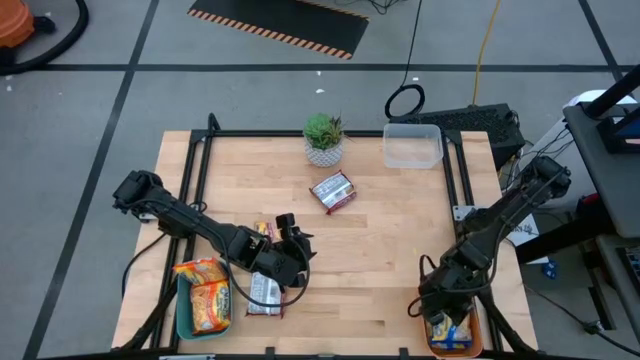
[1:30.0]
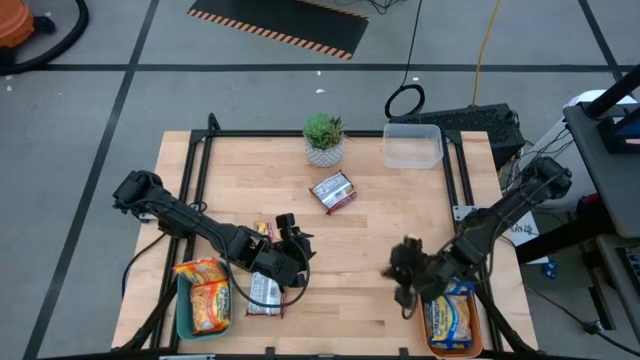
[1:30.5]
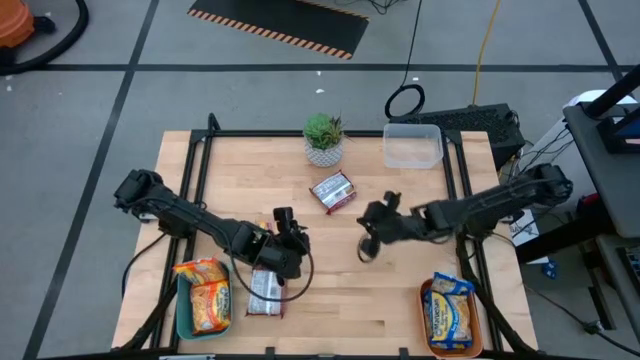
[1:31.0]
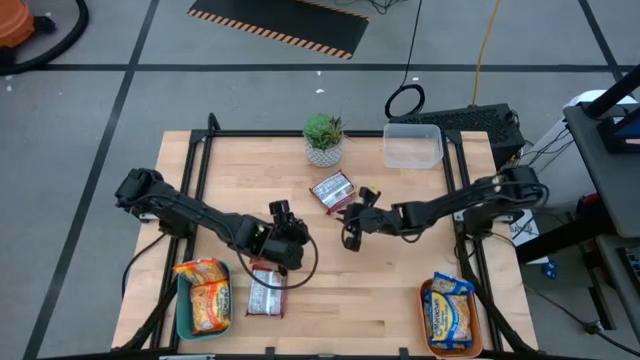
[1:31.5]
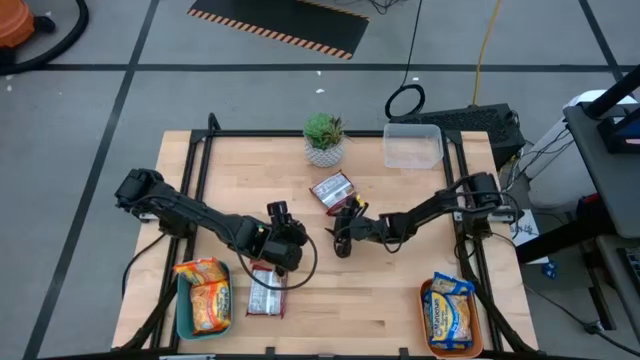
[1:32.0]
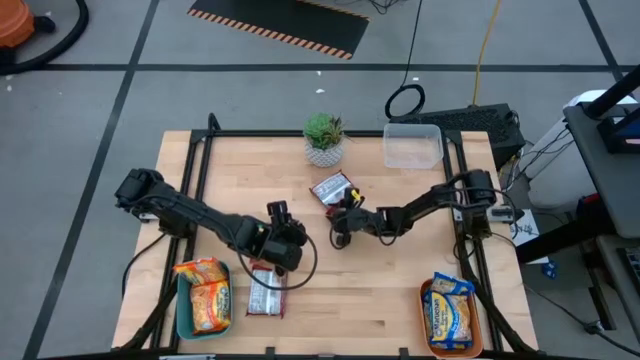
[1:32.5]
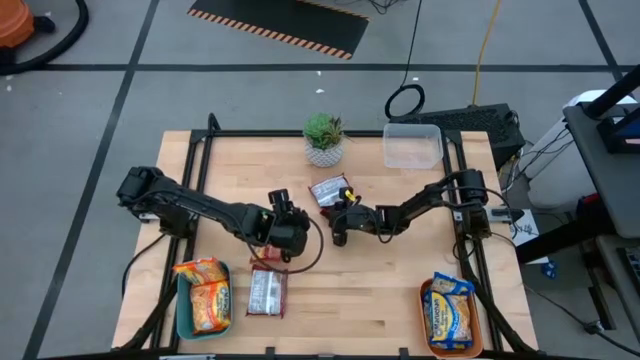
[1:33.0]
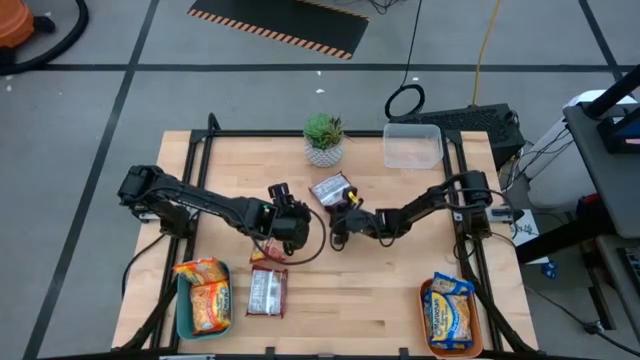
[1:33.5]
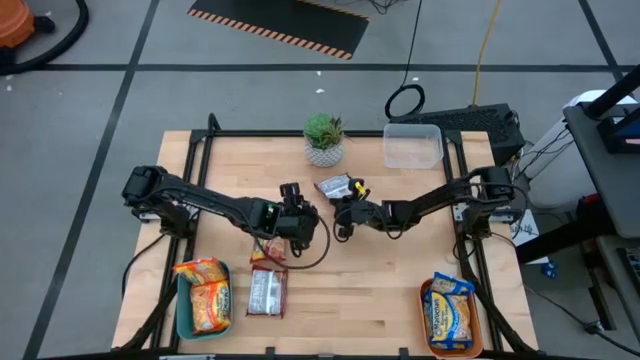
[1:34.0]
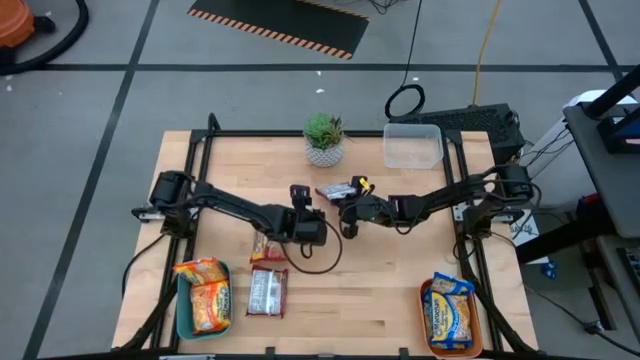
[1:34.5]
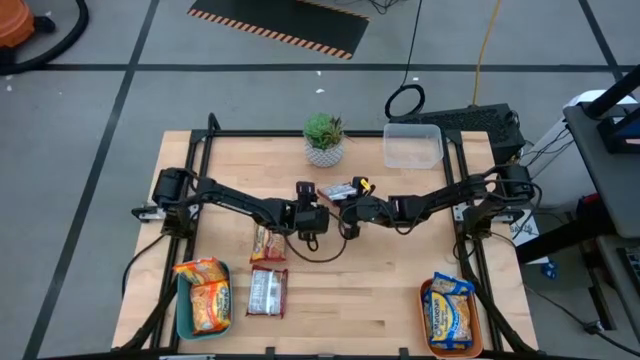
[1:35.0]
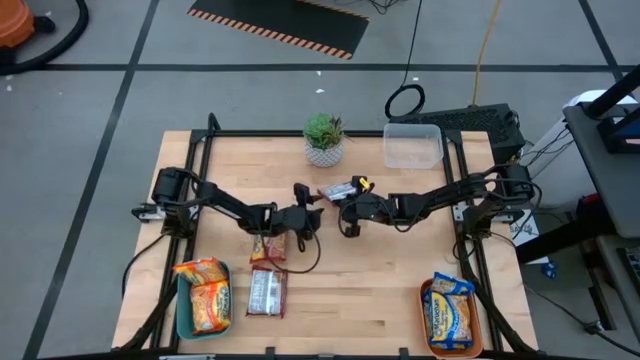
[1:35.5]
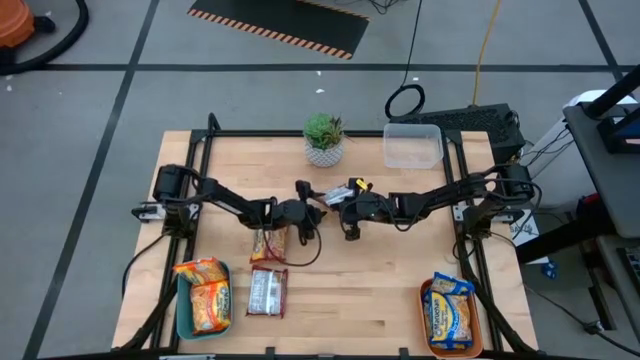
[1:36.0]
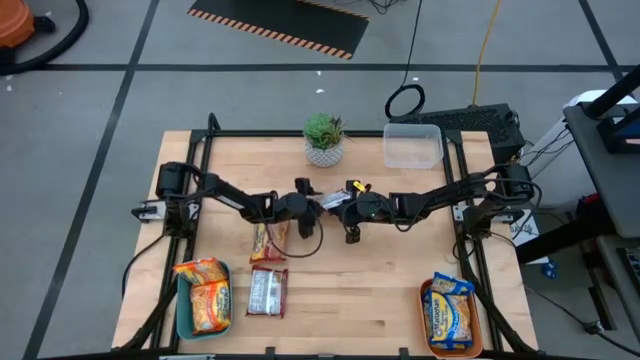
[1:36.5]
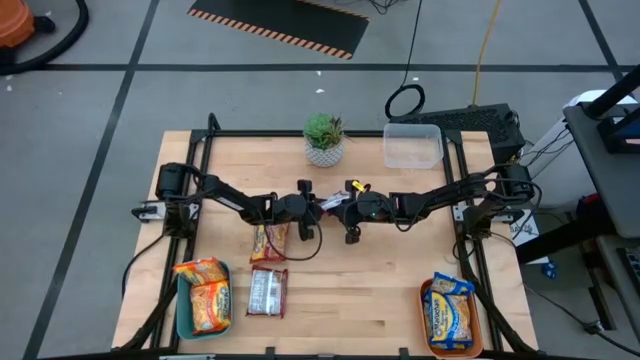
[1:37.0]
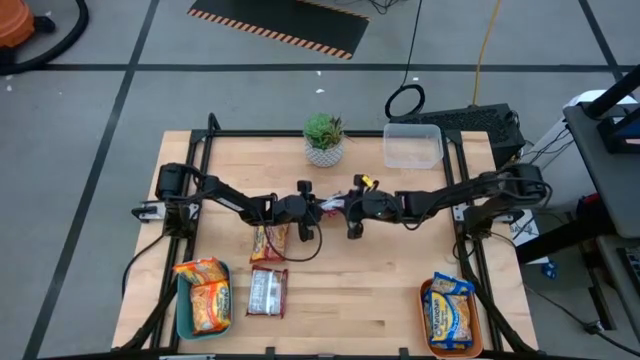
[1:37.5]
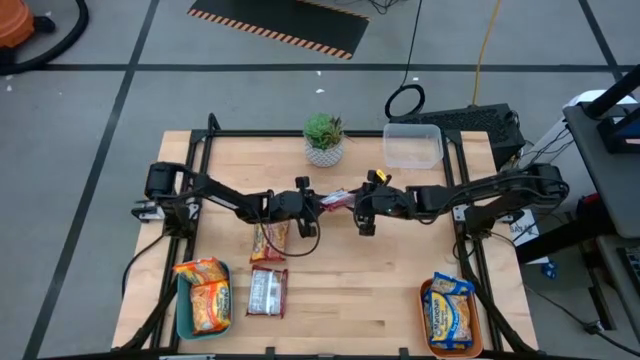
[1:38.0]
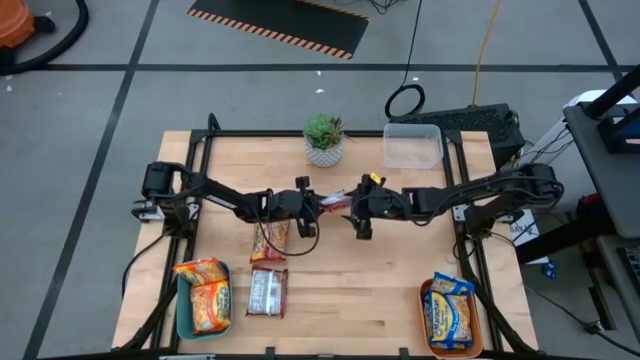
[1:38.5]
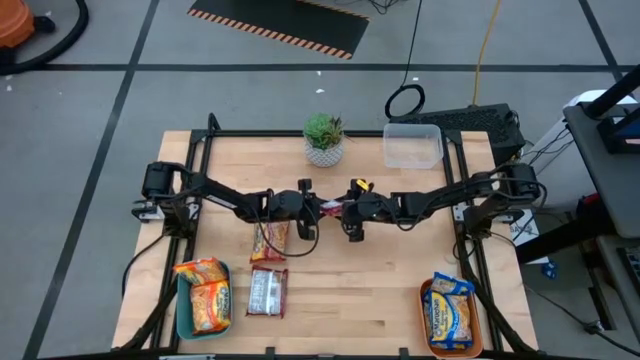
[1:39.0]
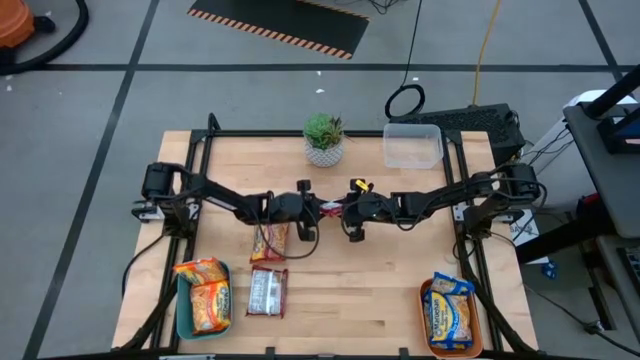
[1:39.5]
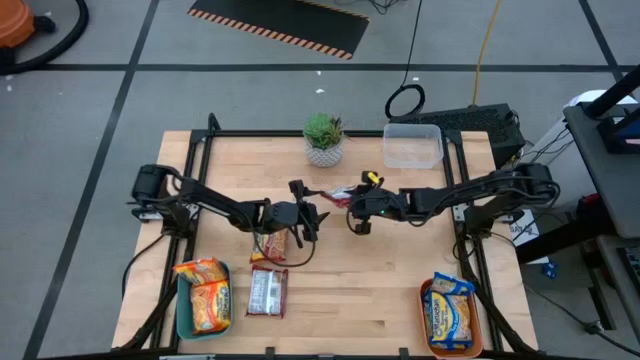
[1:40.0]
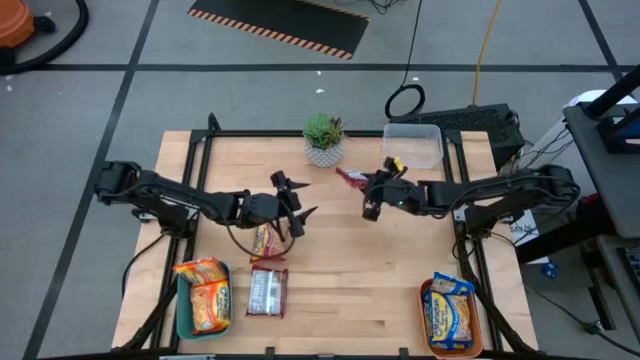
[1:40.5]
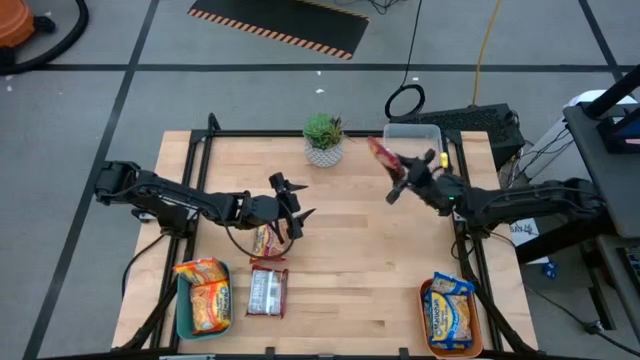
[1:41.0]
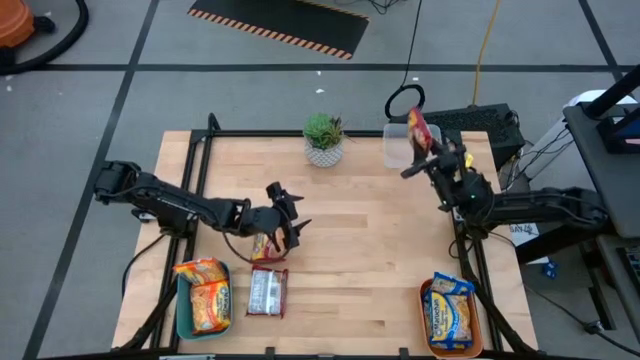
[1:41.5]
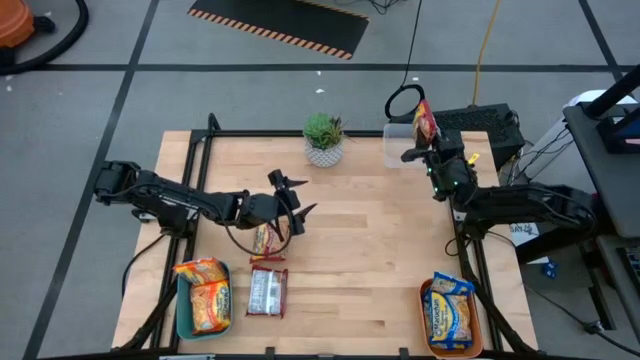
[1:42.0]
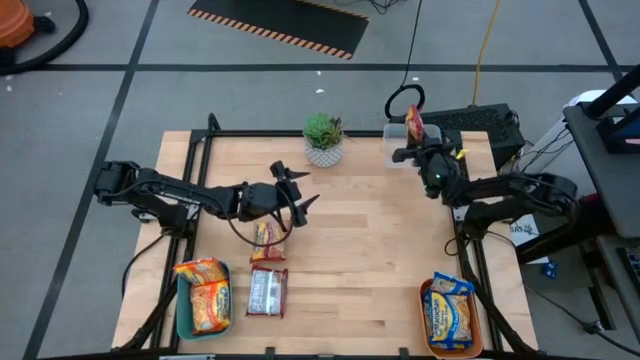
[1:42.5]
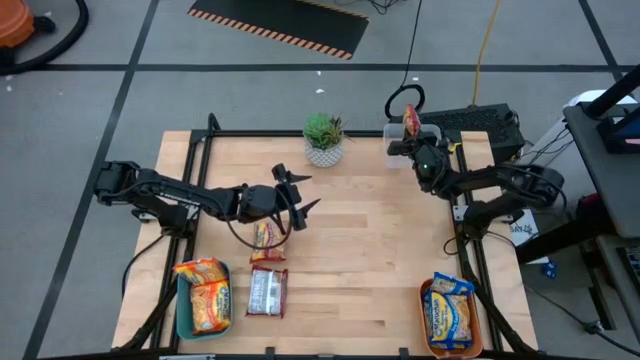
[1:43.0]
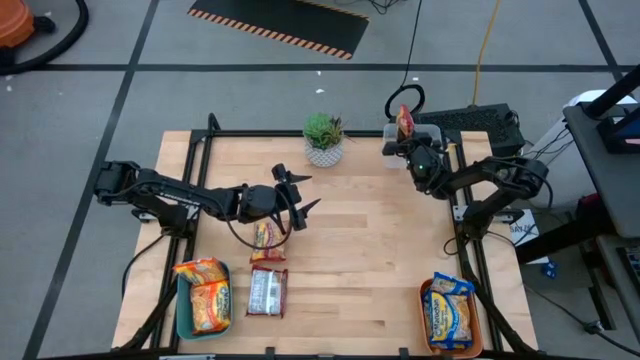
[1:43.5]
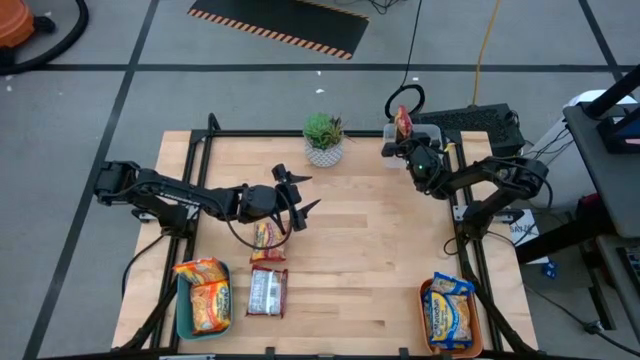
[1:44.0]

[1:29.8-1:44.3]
Task: Sort Maruchan noodles
Put the top red noodle pack into the transparent bin

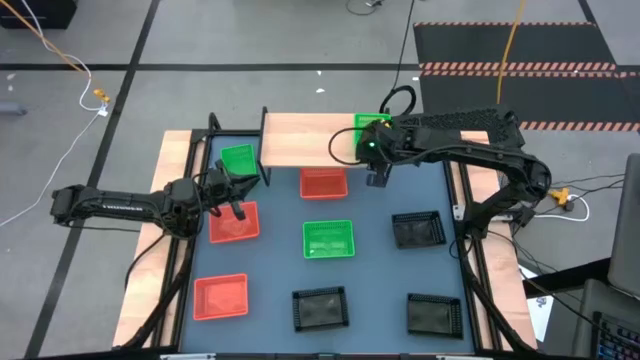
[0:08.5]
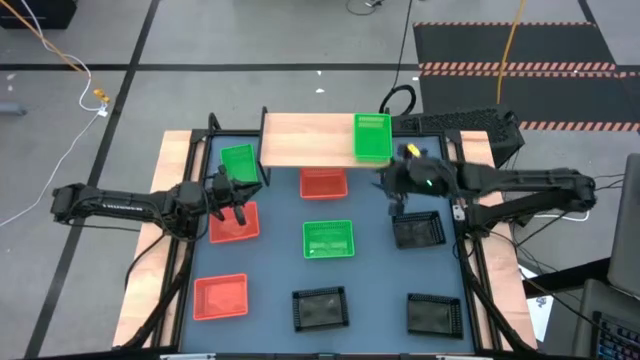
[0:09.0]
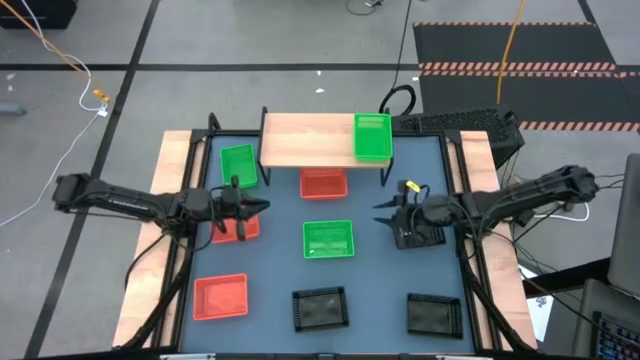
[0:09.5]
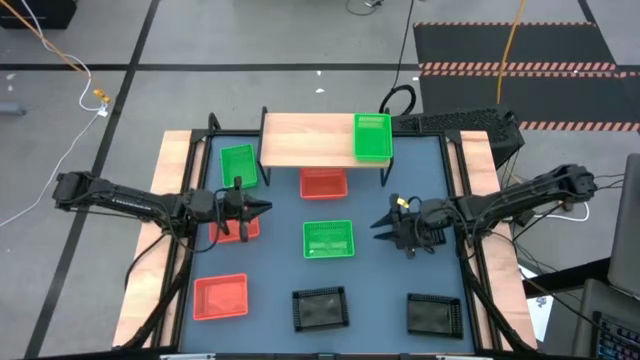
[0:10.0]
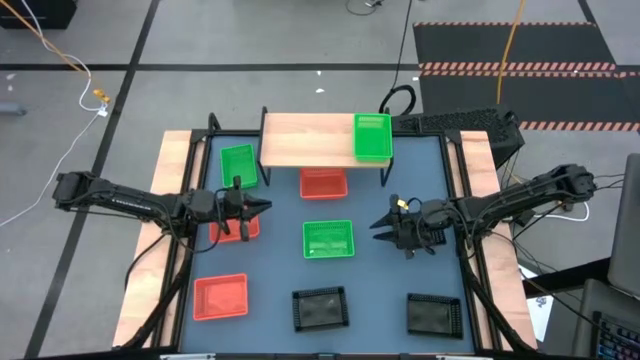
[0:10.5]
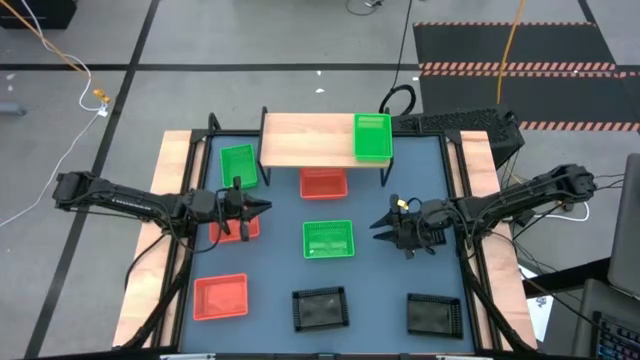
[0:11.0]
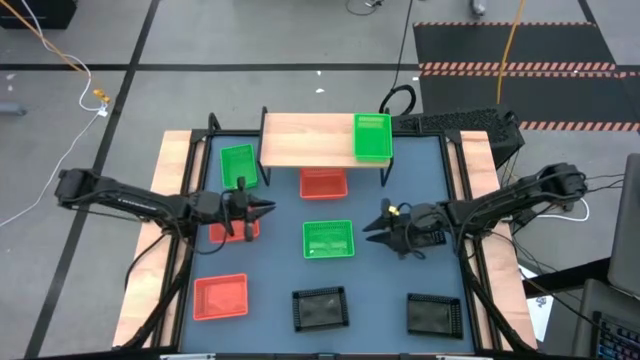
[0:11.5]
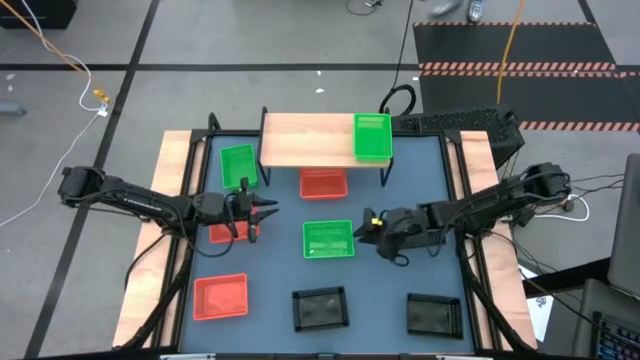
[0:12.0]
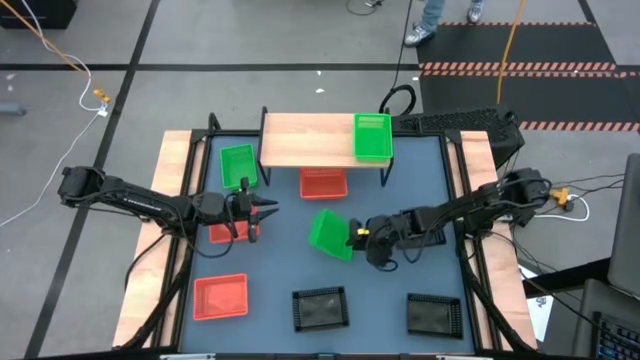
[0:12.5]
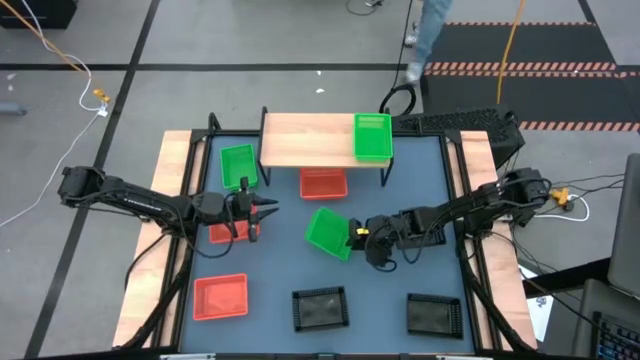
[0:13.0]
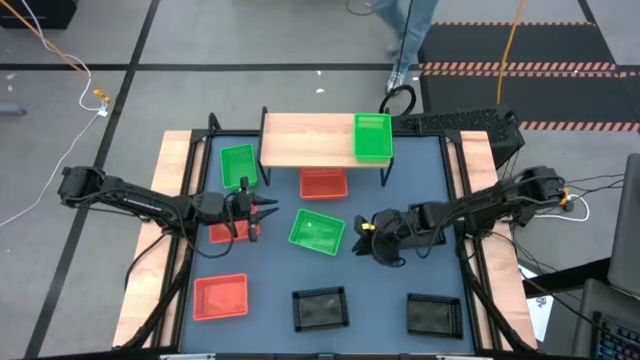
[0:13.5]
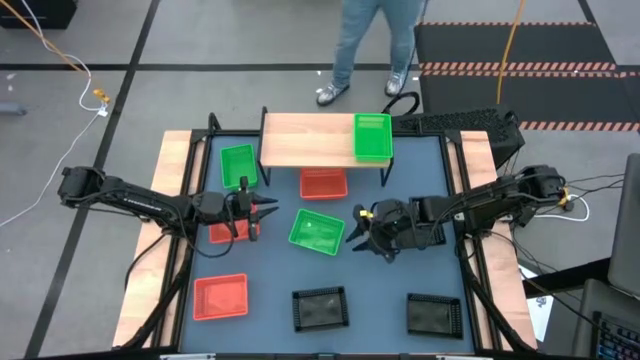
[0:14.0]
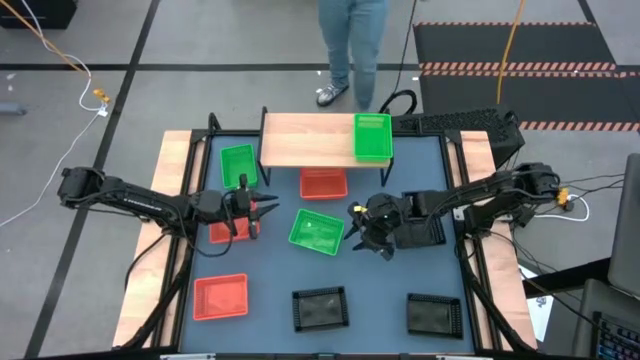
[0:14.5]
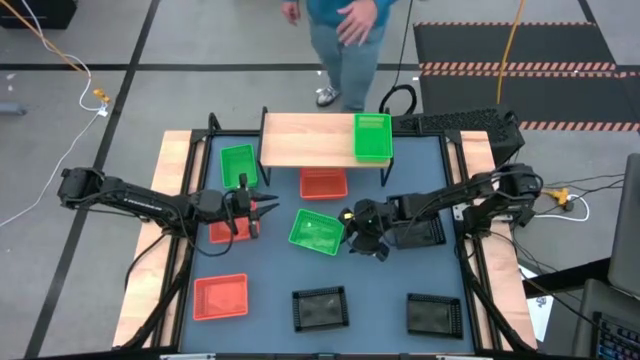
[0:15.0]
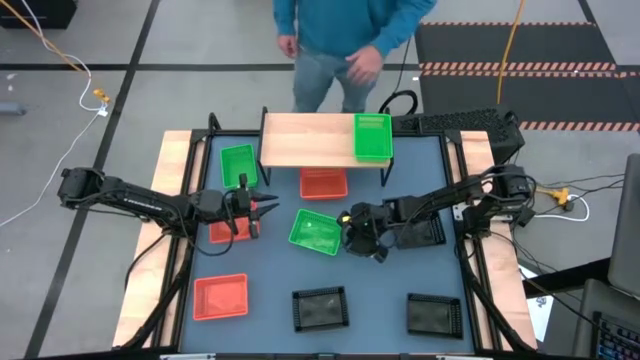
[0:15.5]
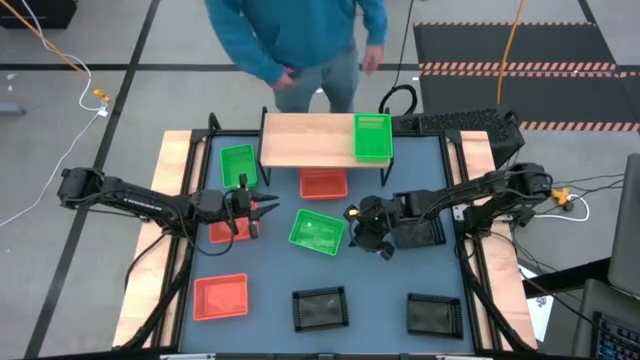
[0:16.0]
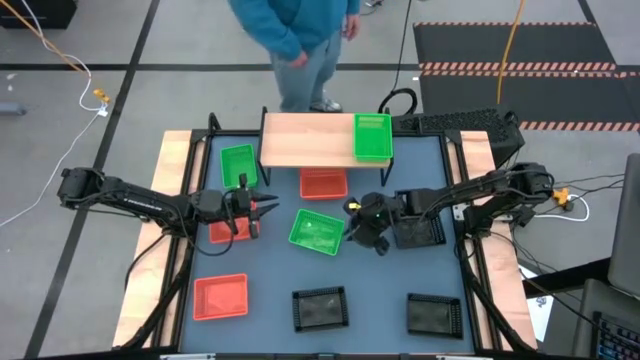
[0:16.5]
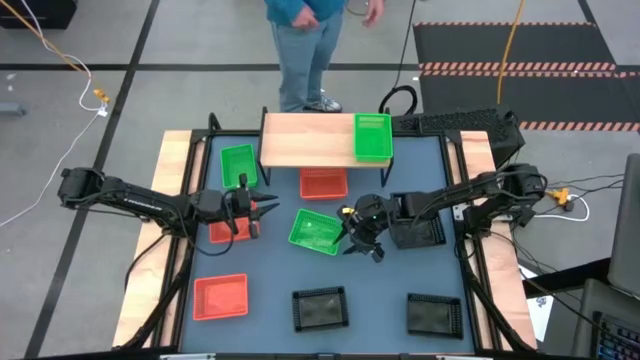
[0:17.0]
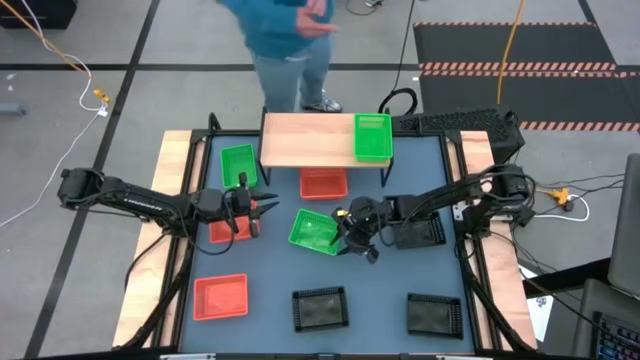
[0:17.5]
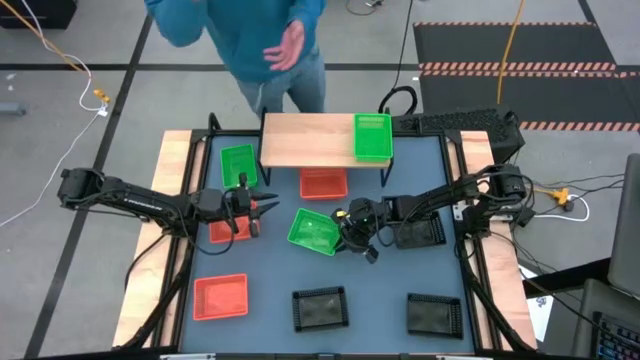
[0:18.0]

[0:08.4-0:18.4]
Task: Stack baskets on shelf by color
Stack the bottom green bin on top of the green bin on the shelf
